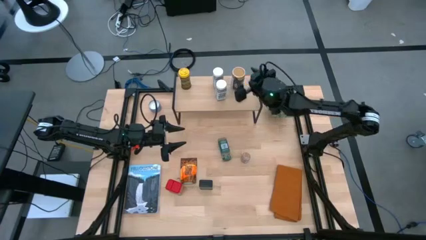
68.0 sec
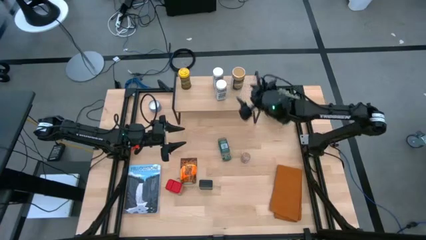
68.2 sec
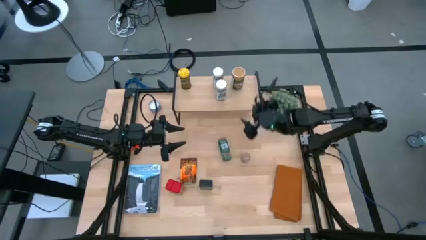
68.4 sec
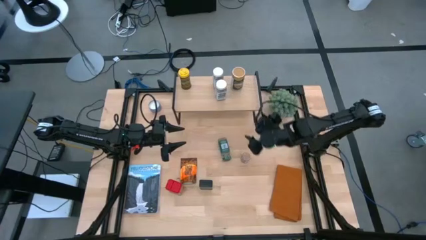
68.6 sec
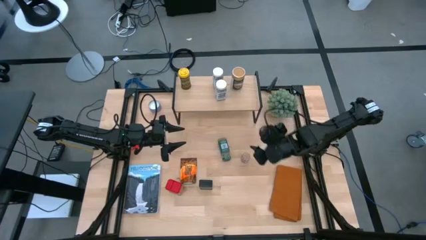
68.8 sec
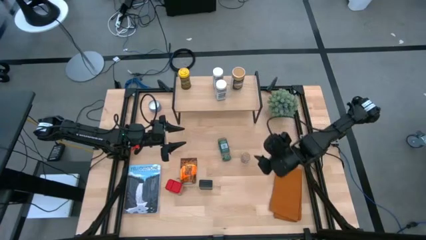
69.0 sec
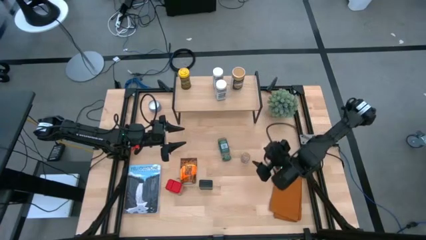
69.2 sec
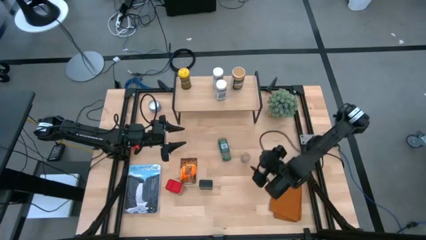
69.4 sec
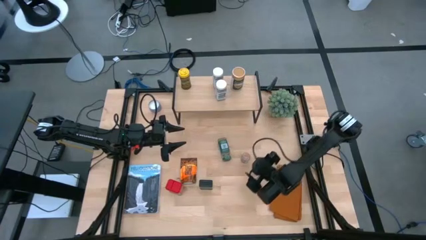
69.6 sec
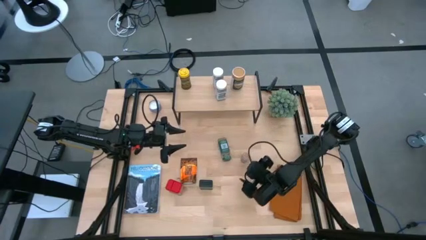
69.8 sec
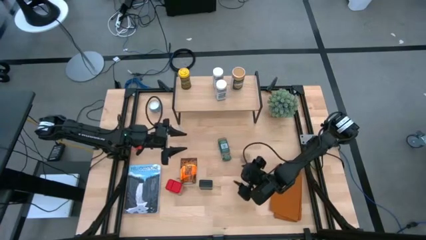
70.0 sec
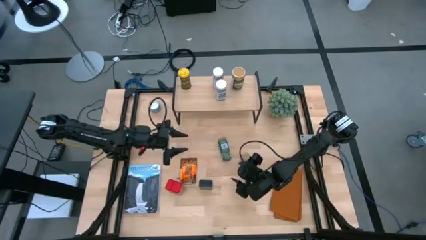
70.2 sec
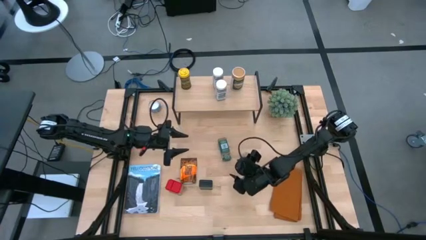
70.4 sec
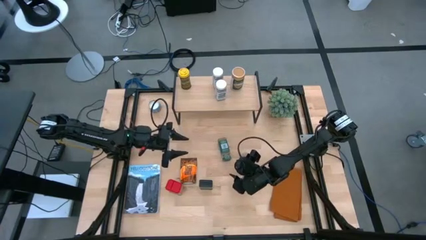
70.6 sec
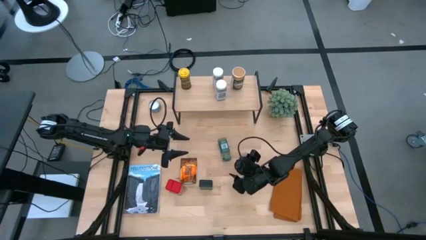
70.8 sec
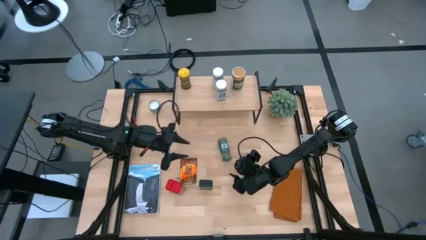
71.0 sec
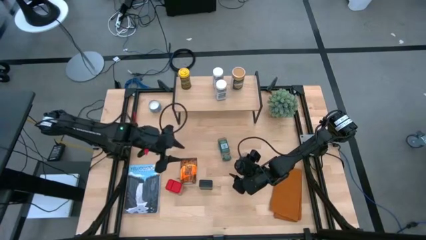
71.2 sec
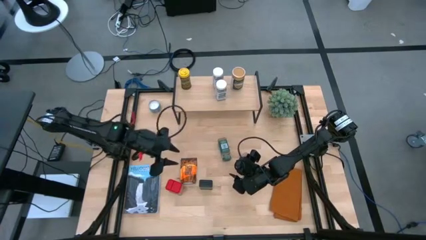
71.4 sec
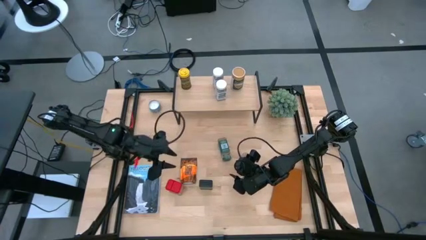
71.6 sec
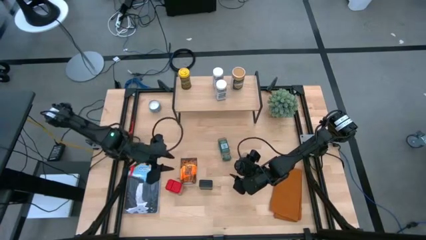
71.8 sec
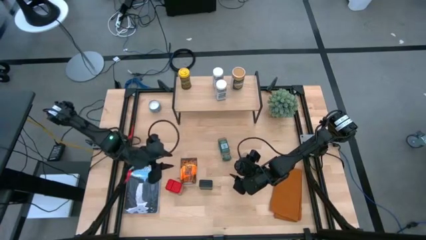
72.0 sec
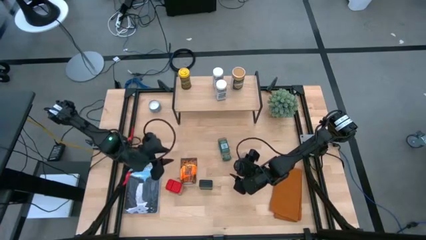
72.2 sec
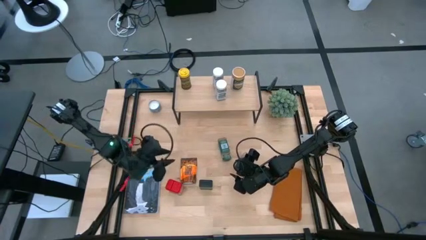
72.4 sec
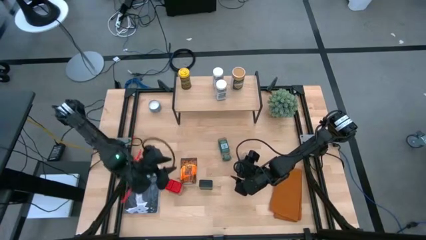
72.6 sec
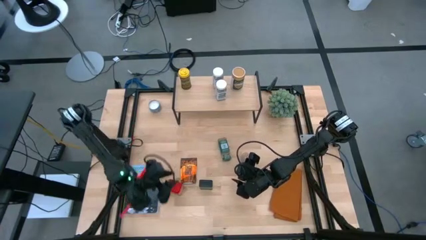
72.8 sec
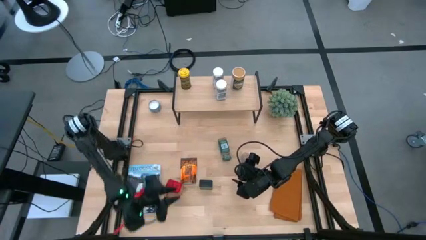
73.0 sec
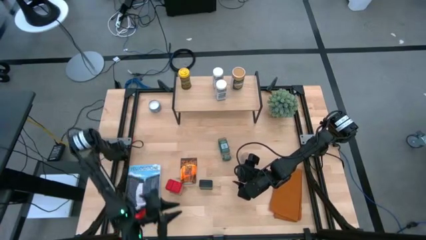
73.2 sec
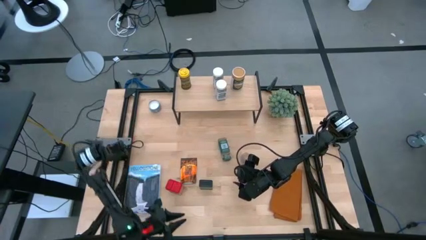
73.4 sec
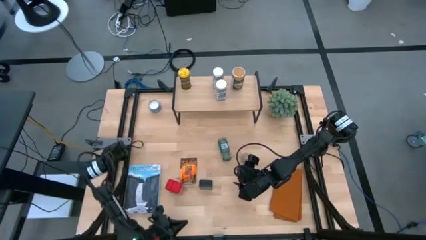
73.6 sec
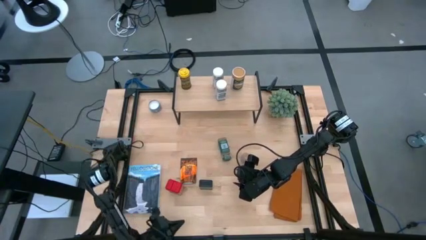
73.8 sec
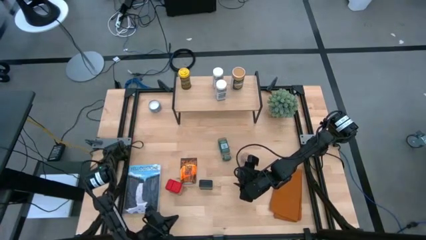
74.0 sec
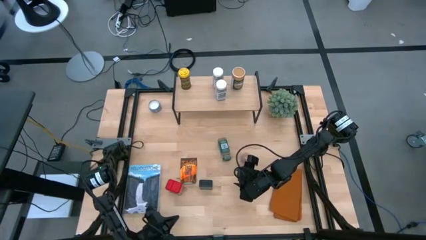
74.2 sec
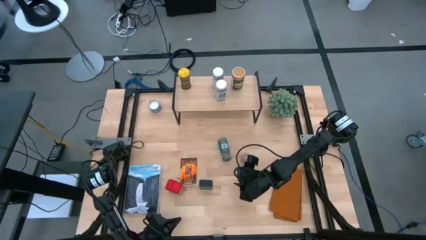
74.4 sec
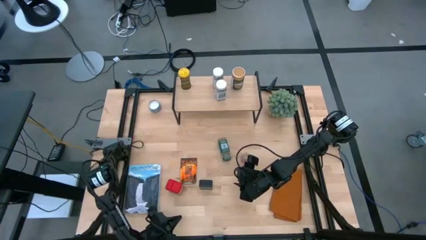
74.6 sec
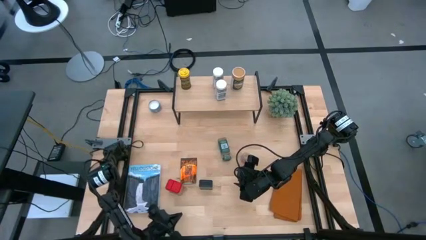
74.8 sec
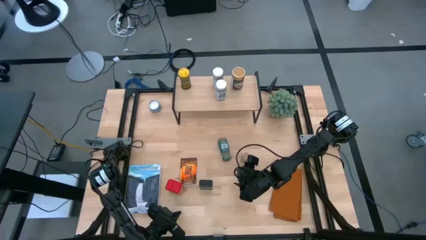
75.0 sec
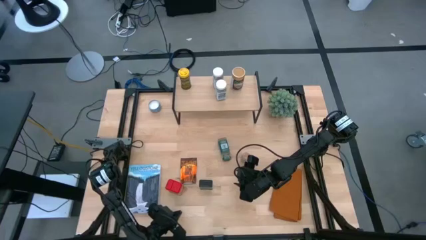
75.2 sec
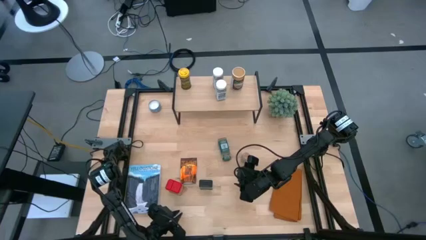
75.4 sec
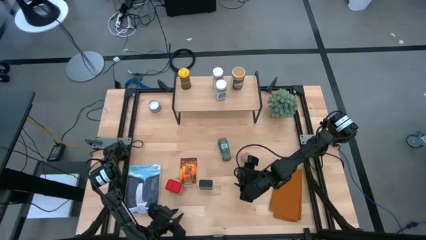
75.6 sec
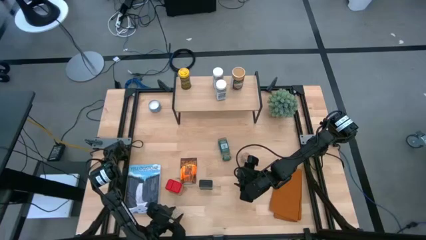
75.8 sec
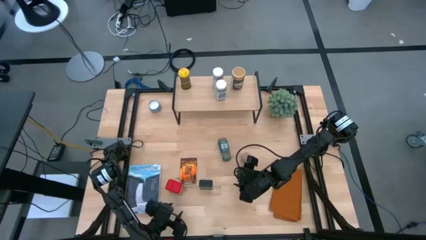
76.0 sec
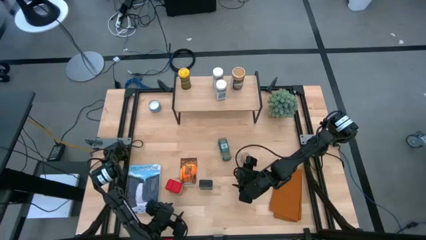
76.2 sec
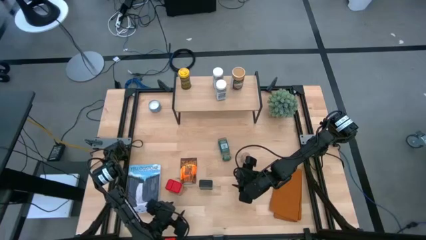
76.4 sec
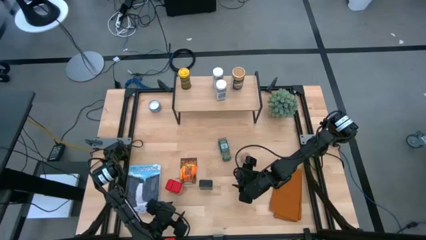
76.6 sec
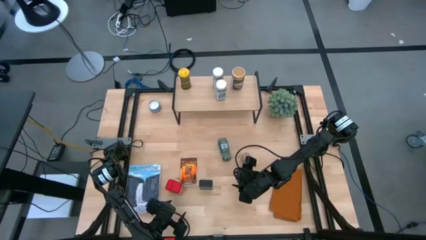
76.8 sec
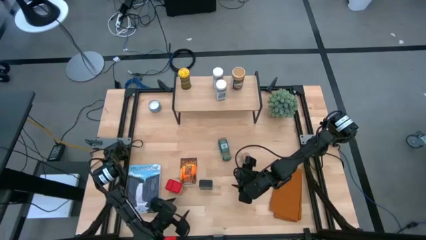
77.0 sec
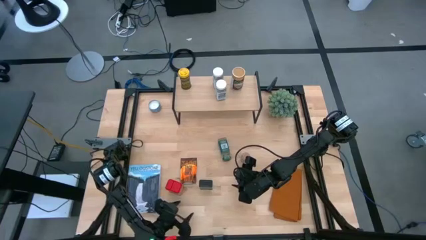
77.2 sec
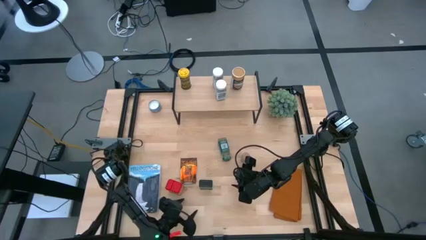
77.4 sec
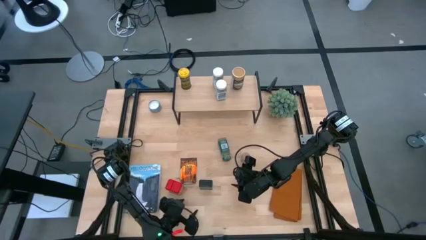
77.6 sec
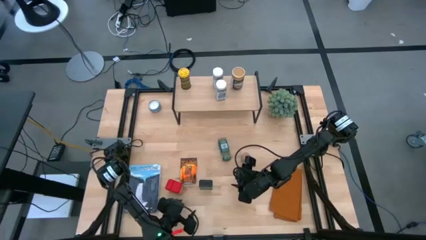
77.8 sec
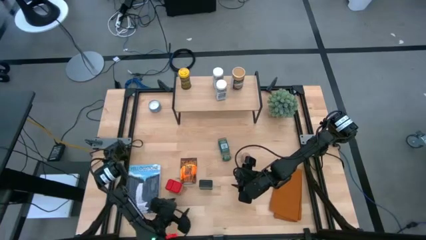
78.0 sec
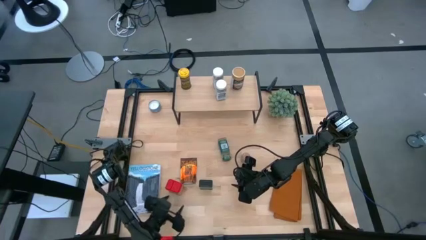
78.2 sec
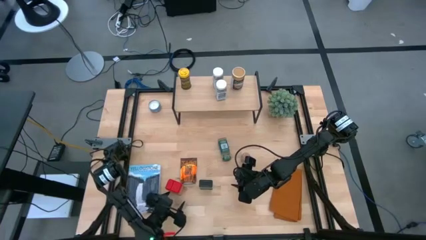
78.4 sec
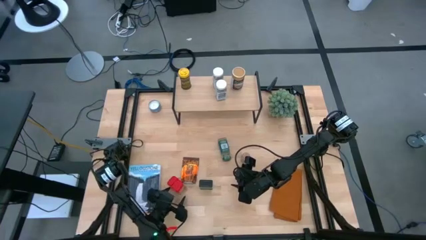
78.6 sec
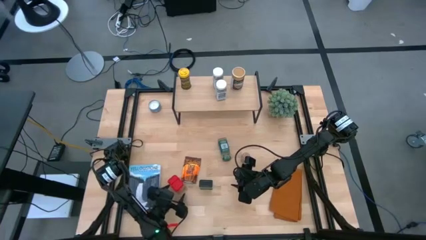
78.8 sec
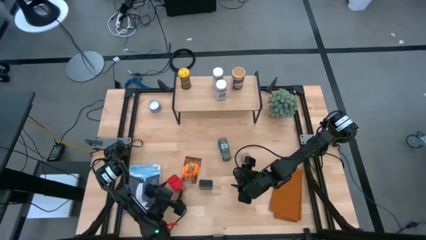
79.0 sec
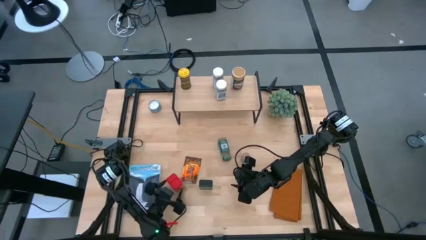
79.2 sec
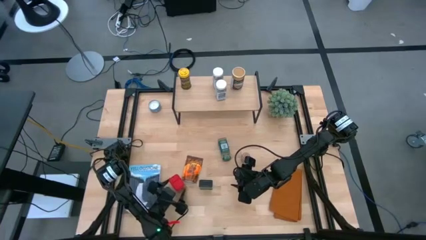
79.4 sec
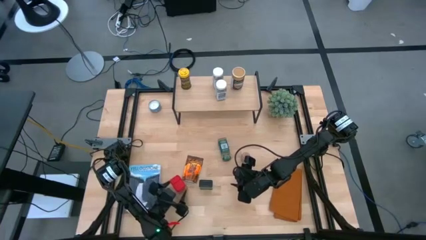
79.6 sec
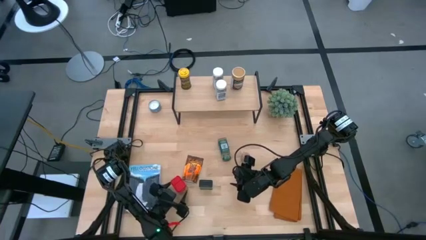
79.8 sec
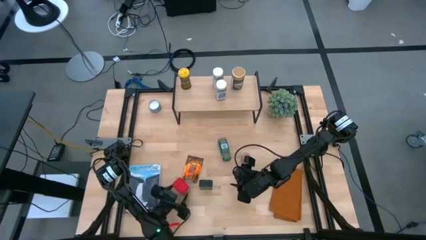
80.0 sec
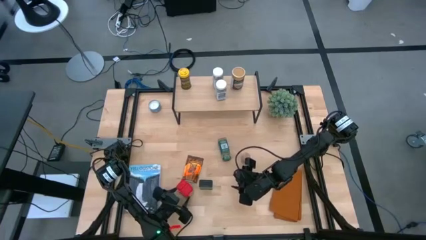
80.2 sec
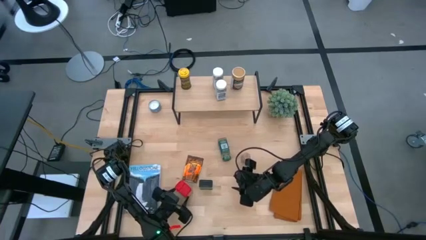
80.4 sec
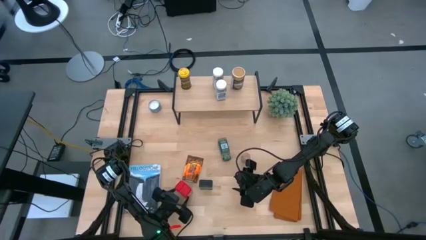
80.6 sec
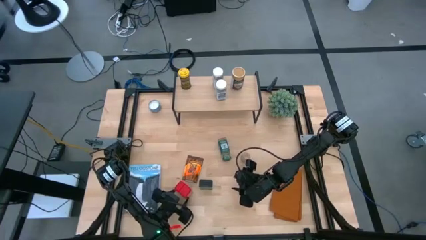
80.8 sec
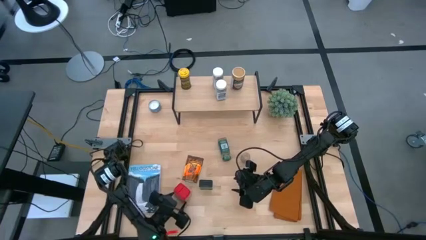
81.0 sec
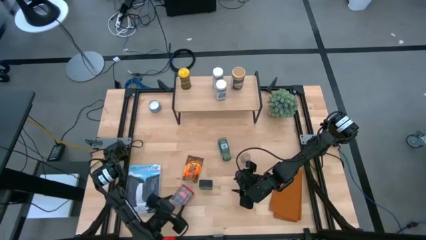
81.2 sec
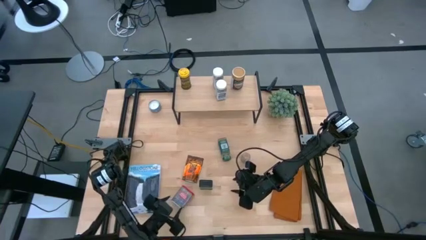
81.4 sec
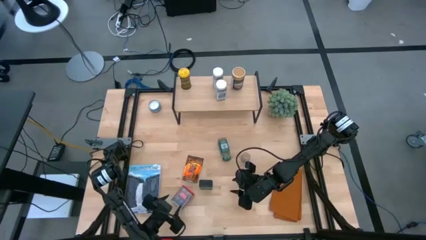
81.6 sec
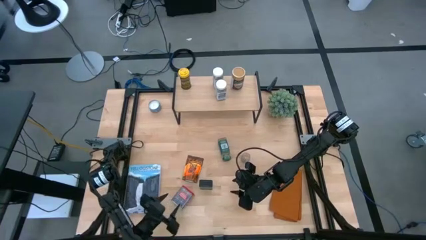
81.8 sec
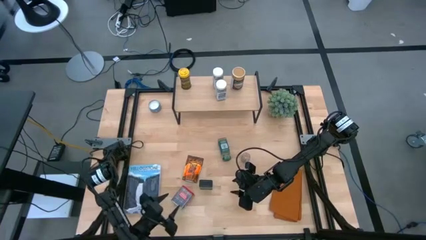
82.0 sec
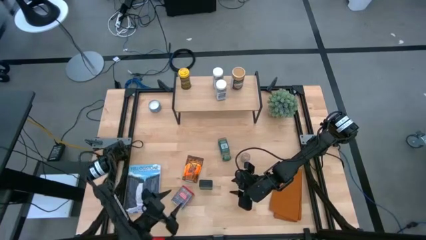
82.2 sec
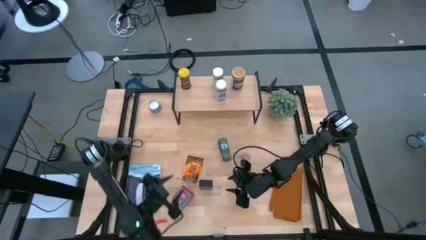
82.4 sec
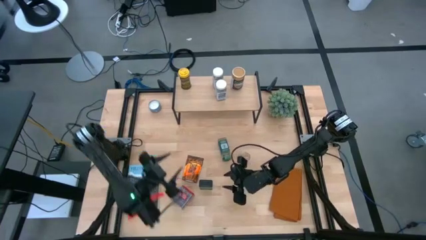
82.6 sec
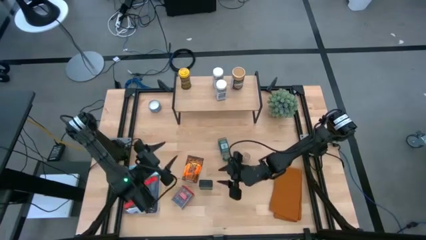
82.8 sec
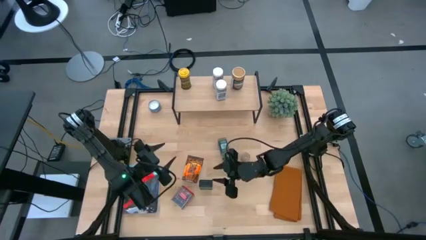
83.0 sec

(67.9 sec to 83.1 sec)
Task: Shelf spices
Put the red can seasoning on the shelf
